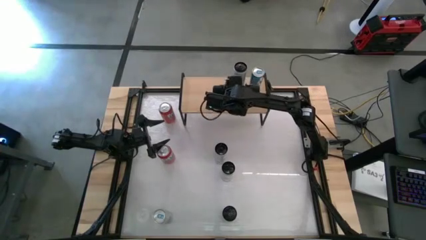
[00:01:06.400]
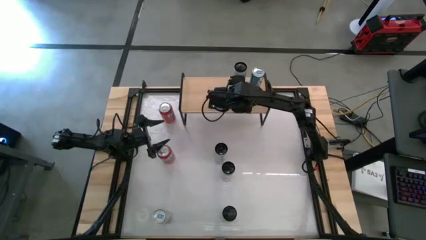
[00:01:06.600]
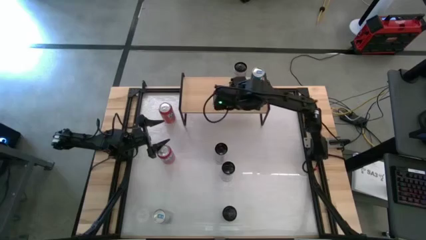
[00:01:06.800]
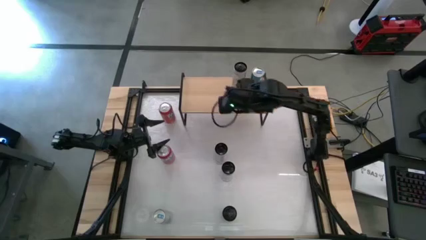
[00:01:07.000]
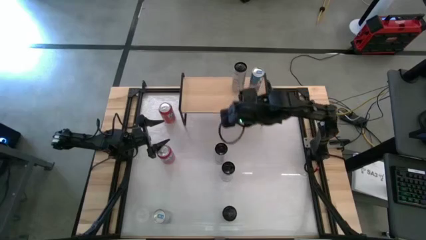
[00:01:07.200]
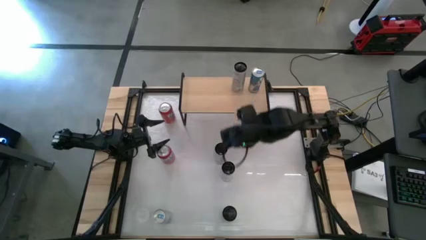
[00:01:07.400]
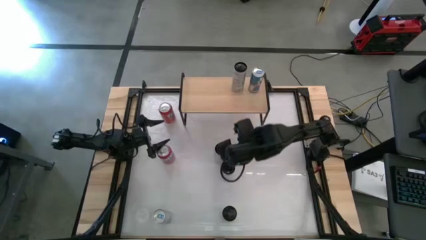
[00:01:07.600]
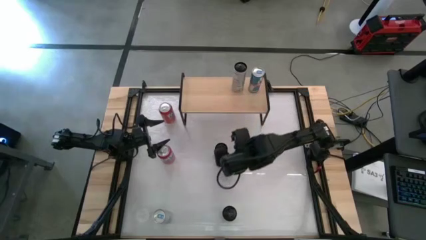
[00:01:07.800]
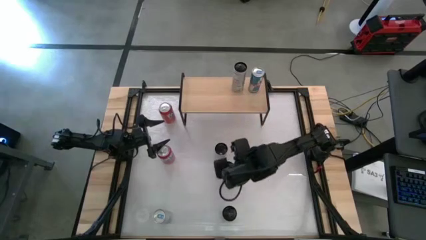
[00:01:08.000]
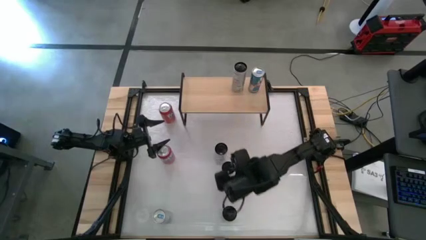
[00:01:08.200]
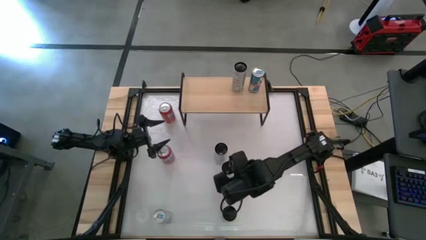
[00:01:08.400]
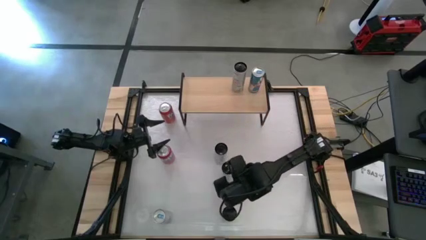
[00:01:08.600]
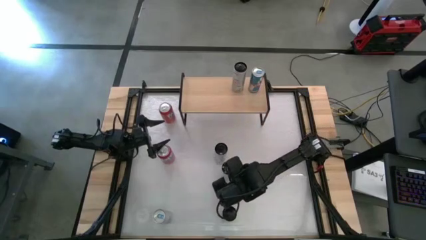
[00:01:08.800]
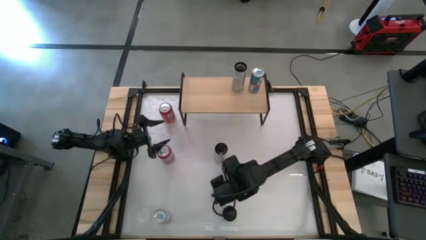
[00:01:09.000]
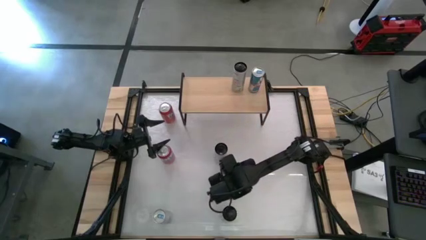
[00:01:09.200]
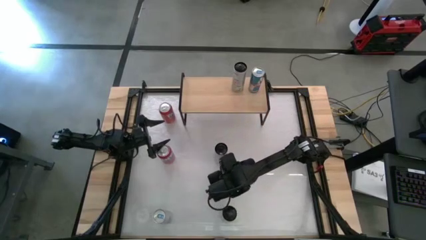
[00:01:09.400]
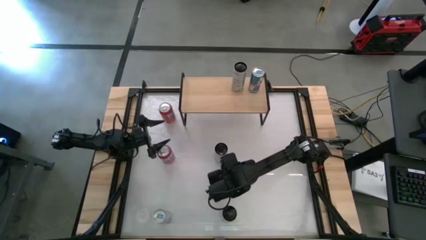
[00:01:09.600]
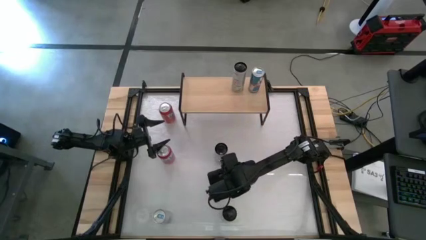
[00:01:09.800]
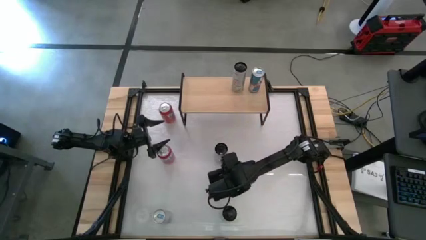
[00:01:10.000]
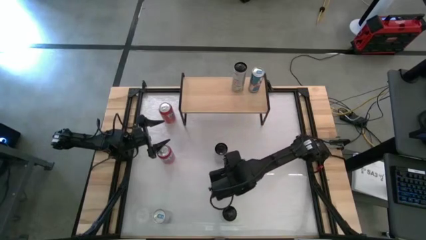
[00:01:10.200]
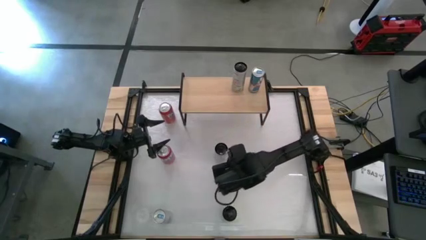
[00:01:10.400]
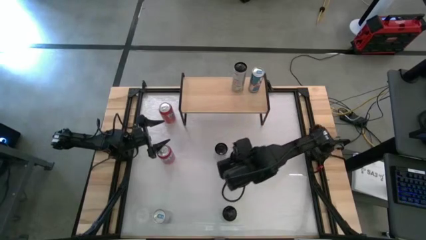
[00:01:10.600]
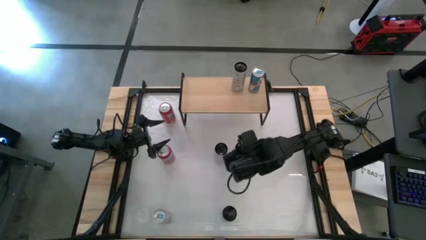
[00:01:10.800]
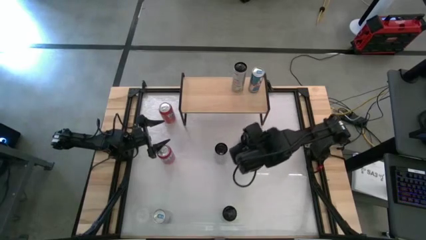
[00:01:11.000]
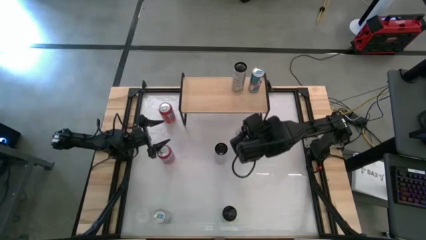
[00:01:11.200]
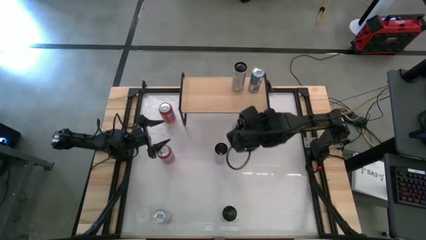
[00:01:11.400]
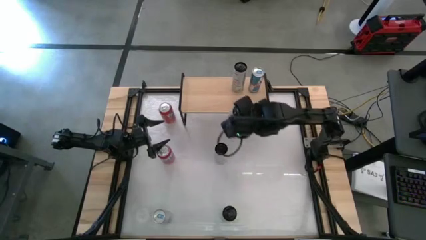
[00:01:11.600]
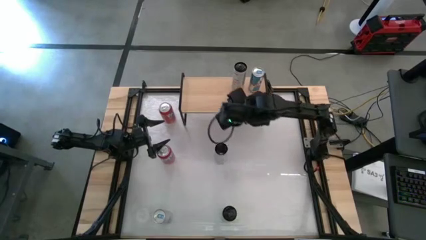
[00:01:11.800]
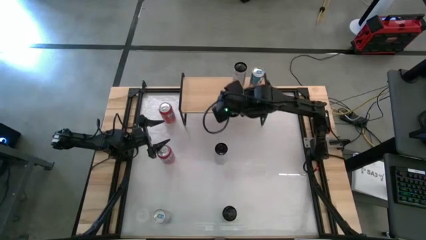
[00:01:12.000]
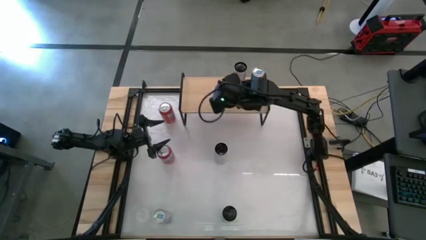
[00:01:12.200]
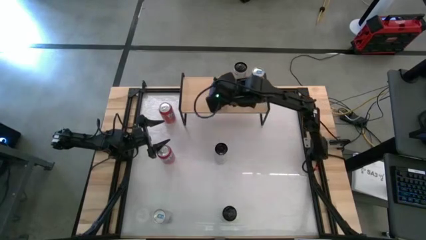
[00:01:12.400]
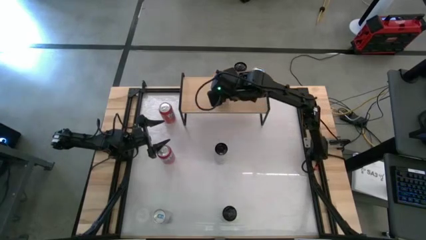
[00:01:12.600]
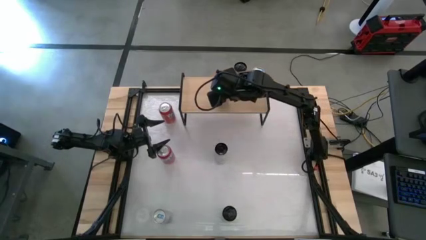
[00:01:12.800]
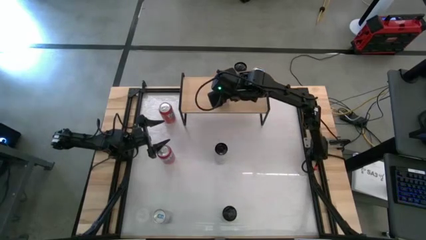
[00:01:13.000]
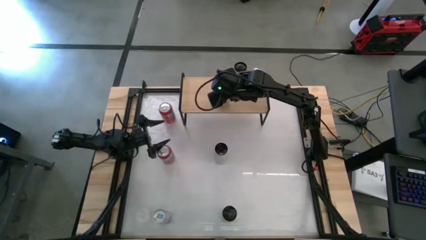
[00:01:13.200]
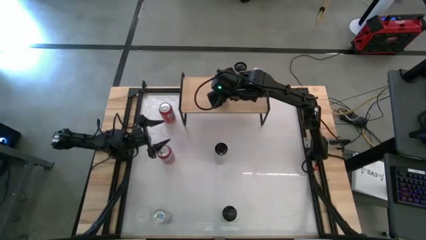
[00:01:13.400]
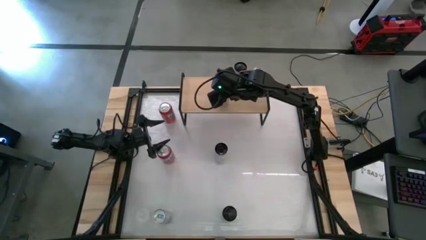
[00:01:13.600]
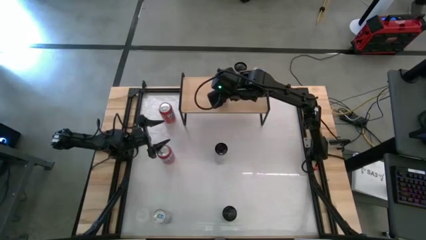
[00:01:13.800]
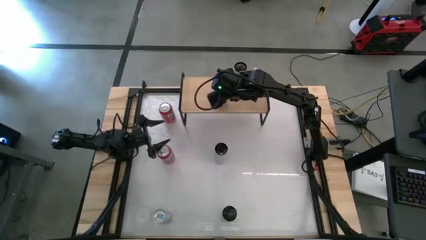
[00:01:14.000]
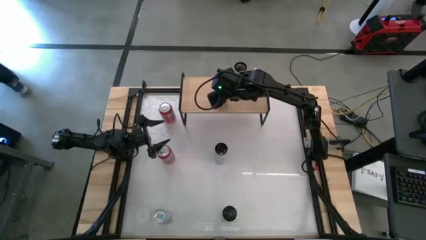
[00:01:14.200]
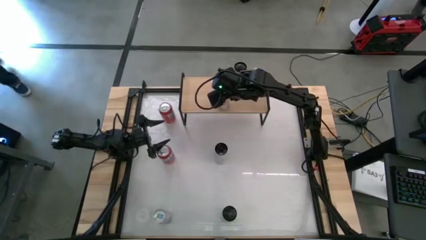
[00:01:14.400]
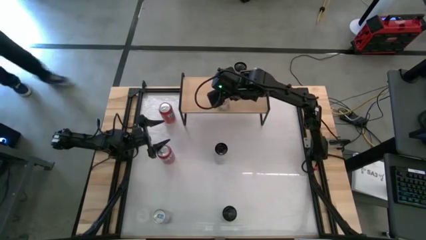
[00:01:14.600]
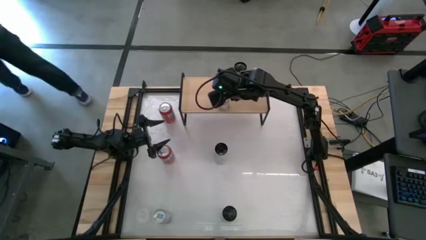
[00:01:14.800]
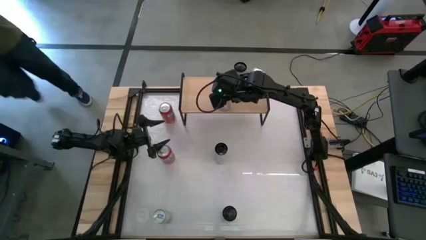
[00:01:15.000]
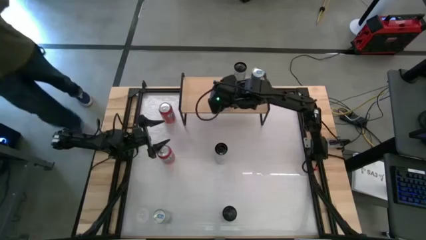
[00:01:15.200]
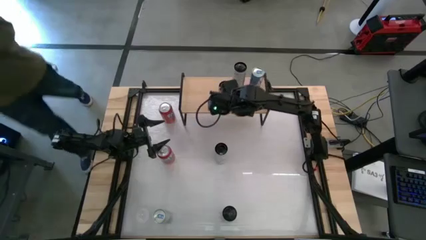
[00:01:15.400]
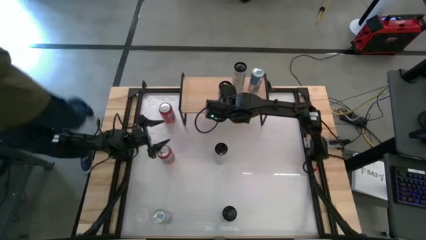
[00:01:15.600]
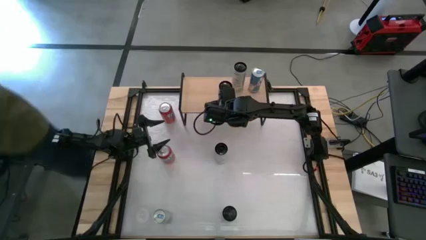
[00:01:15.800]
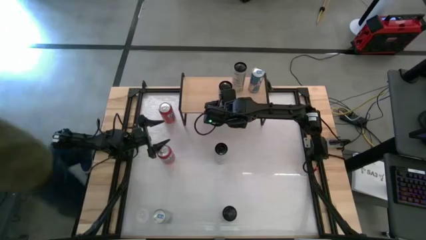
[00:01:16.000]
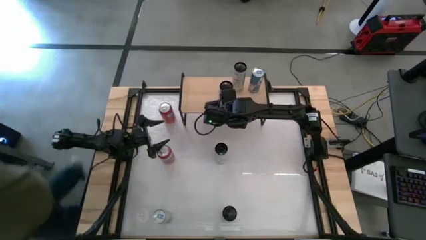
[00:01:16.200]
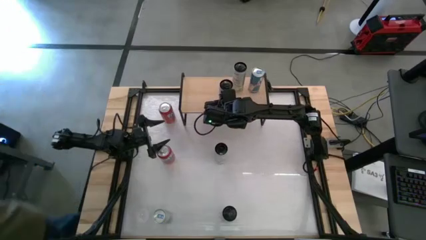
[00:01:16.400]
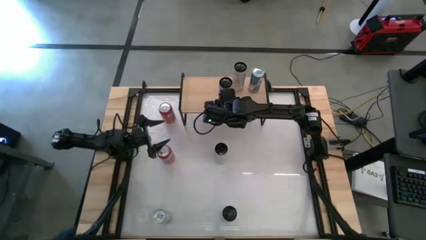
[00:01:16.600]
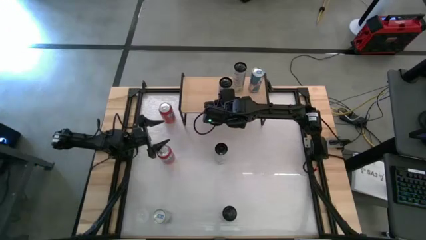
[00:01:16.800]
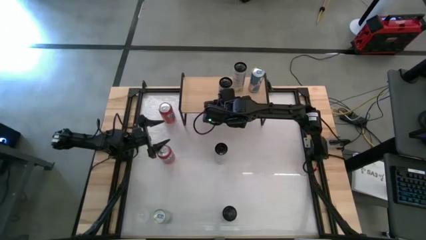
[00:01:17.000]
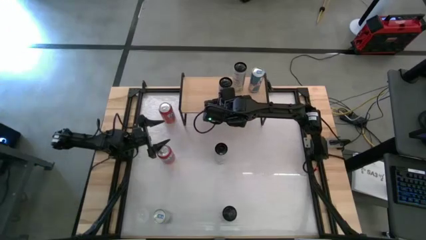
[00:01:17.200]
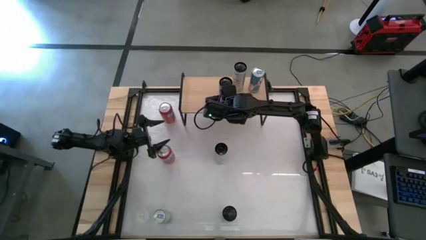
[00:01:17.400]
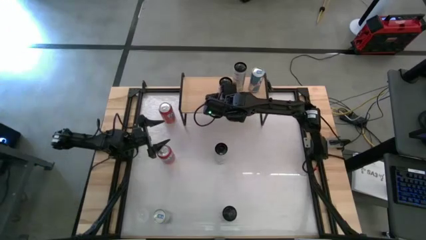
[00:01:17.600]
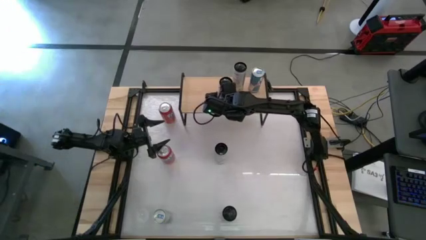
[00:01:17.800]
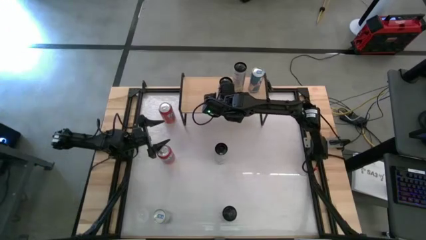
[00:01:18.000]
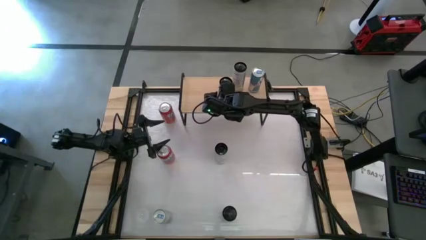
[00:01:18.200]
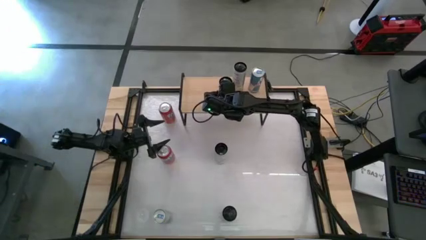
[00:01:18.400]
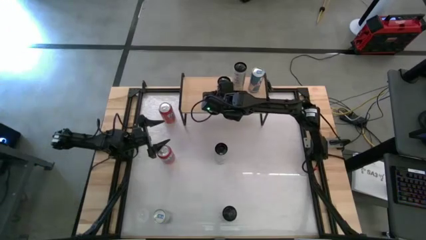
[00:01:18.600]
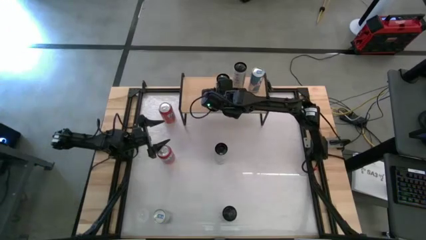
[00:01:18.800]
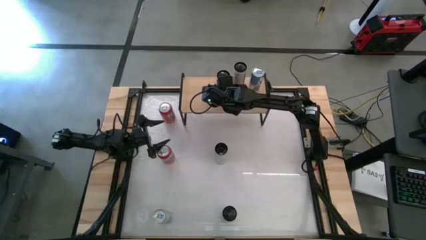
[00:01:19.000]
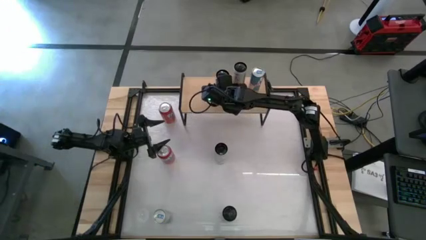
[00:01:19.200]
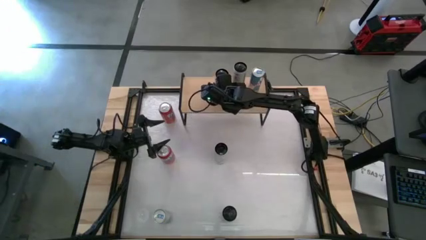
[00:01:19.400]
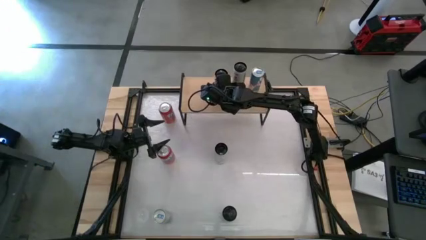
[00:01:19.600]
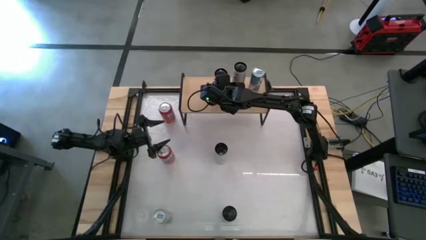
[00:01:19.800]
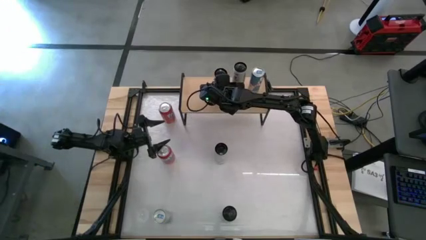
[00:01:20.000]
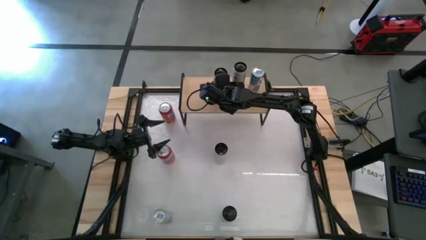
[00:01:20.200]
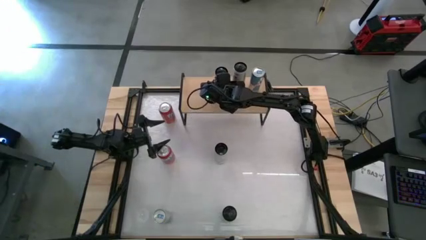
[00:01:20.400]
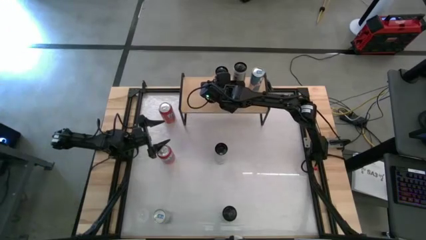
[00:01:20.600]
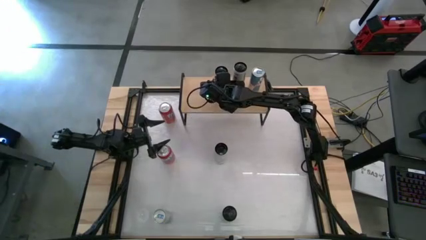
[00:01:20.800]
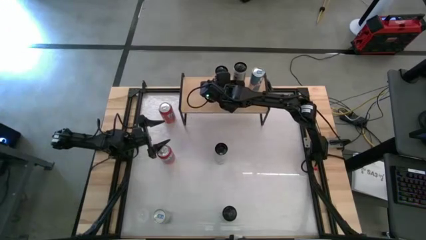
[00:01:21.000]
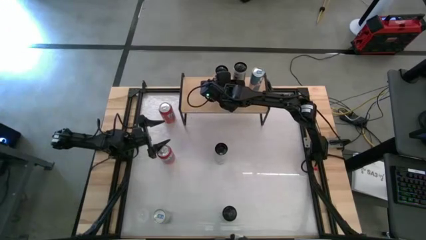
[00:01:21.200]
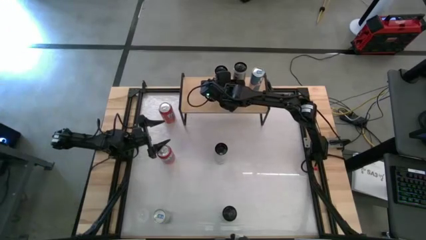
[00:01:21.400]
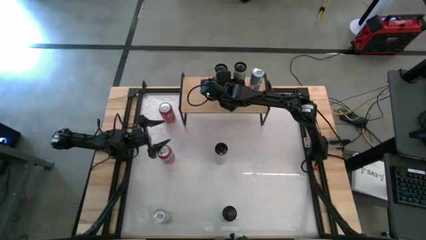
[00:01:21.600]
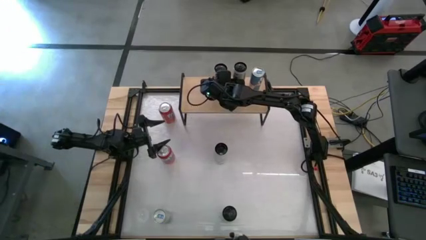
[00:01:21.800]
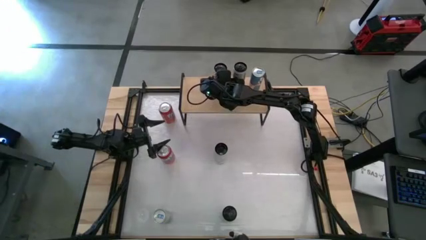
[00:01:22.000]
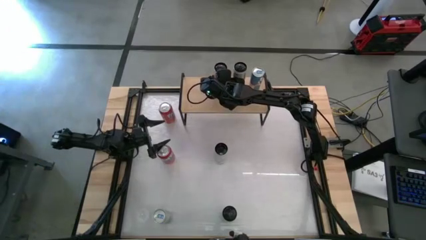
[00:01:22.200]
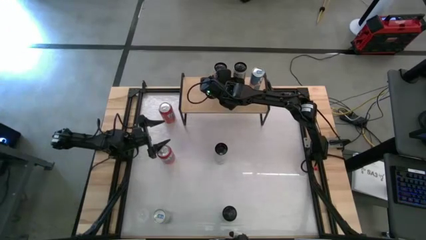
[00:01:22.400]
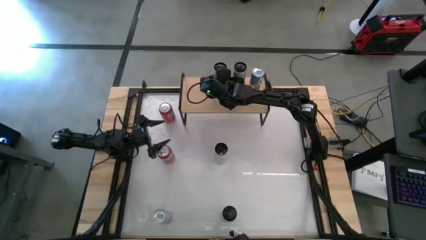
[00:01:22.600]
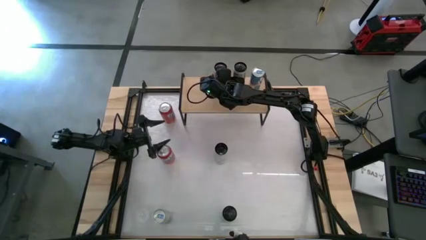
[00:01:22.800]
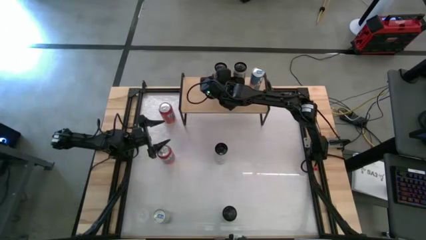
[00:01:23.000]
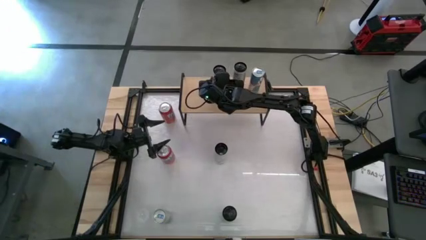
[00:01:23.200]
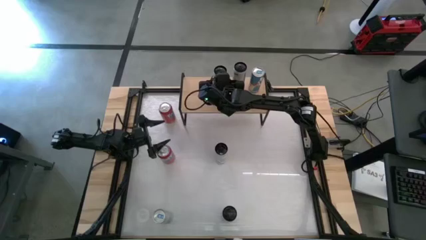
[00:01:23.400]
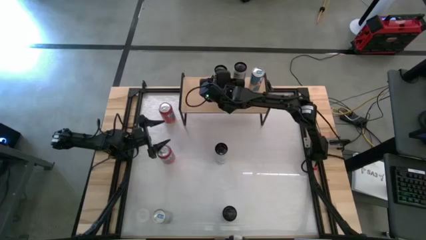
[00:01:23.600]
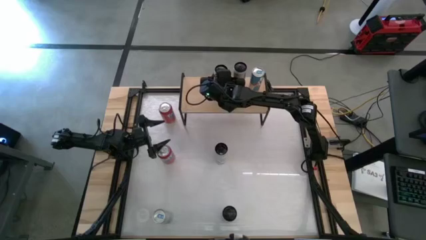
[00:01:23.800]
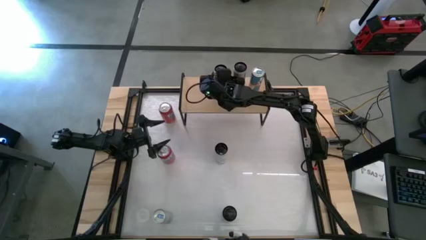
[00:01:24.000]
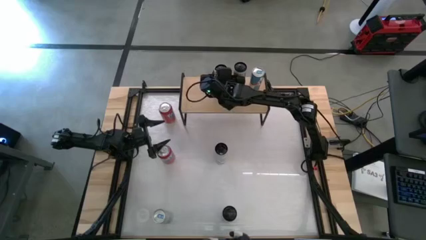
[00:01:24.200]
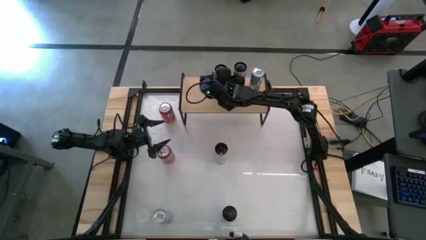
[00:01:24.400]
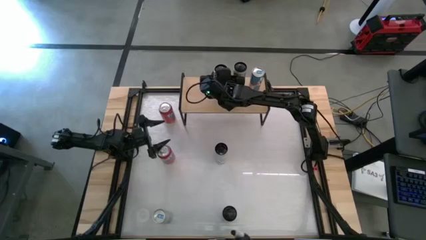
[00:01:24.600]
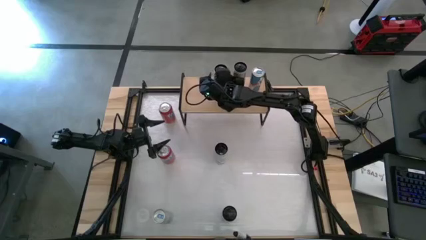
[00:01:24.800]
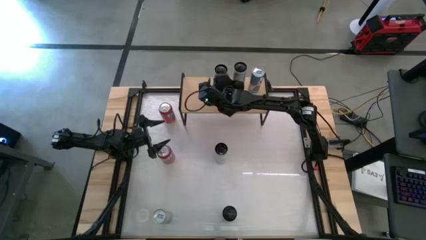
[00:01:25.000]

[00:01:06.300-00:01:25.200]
Task: Place canned beverage on shelf
Put the bottom white pink soda can on the shelf
